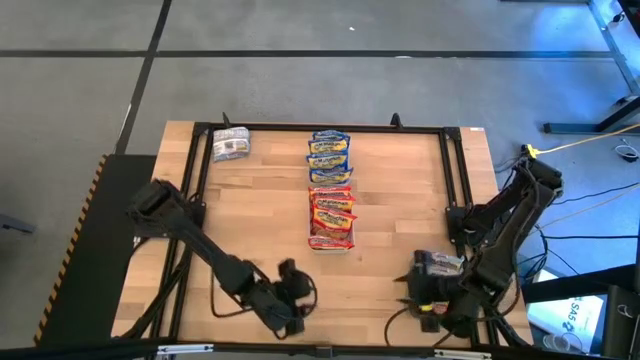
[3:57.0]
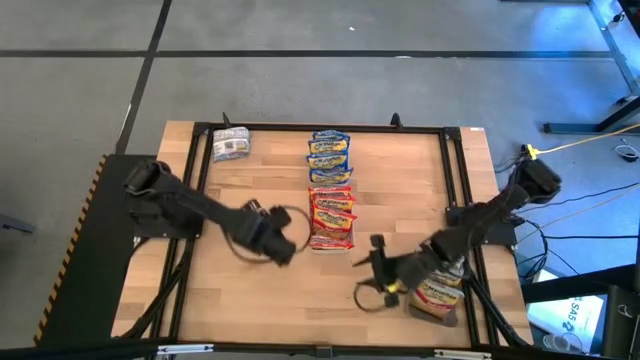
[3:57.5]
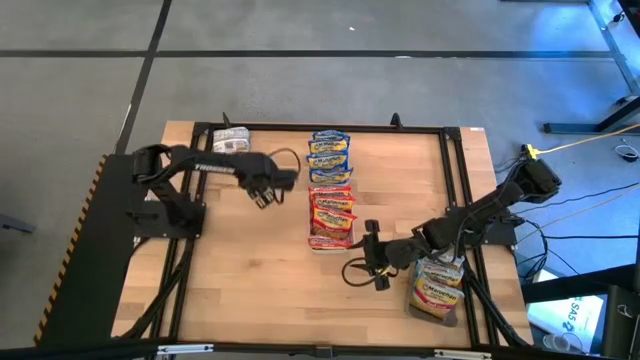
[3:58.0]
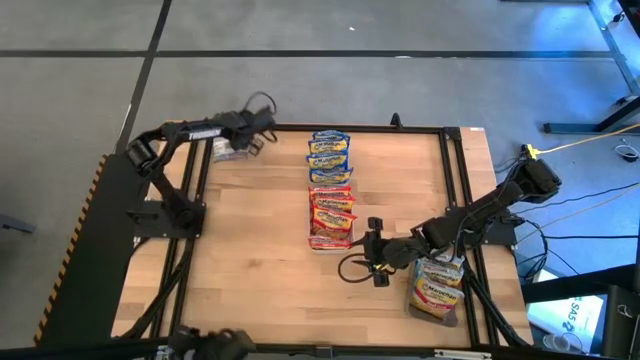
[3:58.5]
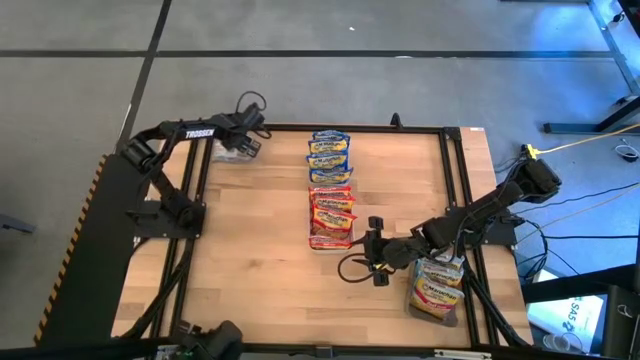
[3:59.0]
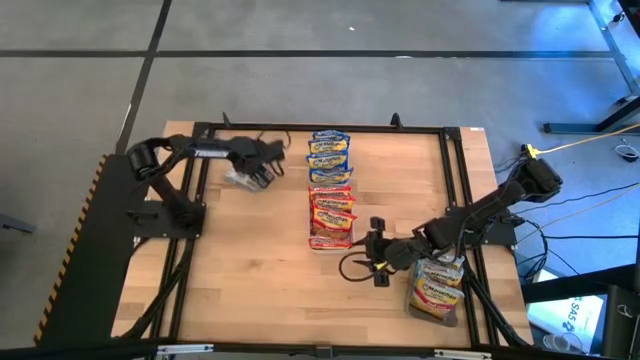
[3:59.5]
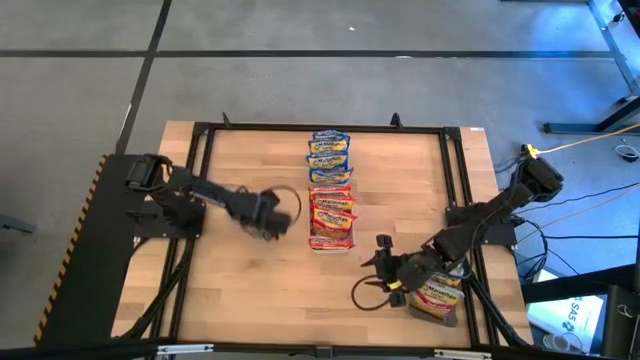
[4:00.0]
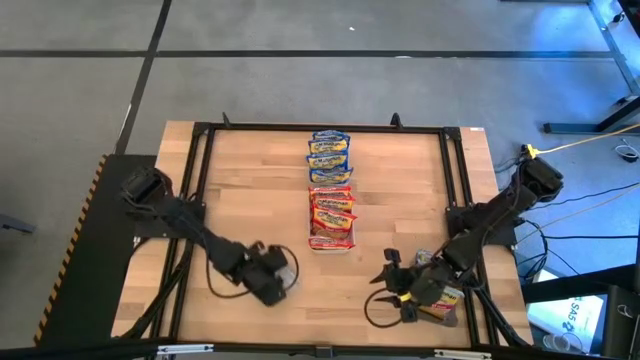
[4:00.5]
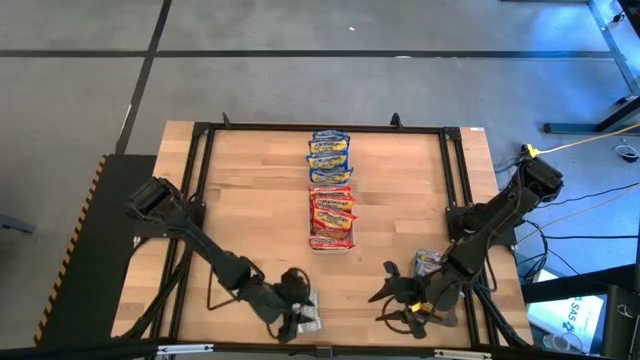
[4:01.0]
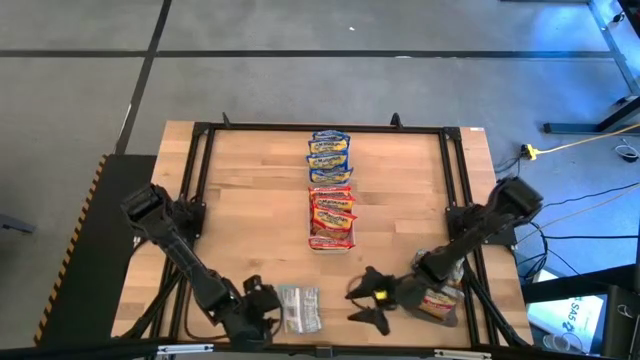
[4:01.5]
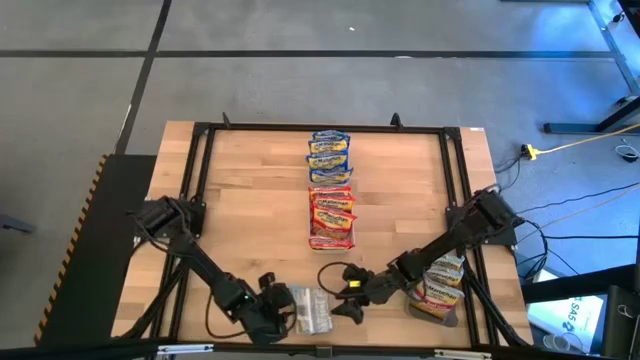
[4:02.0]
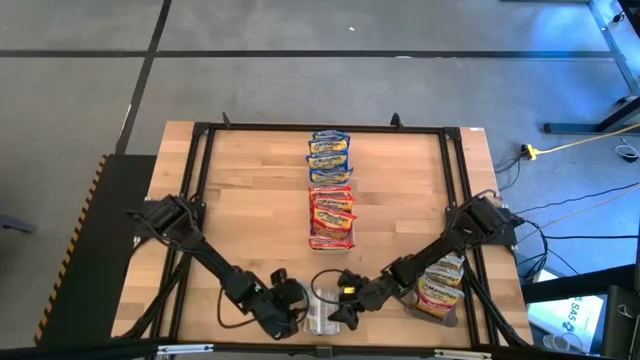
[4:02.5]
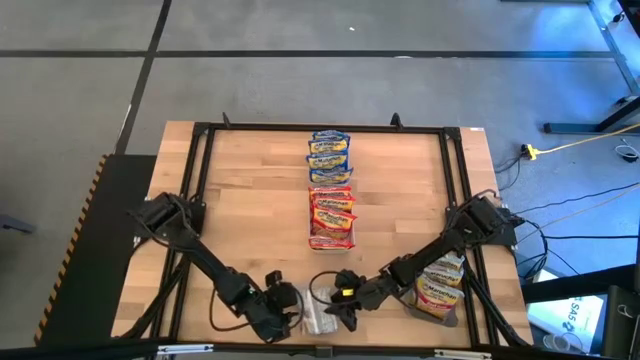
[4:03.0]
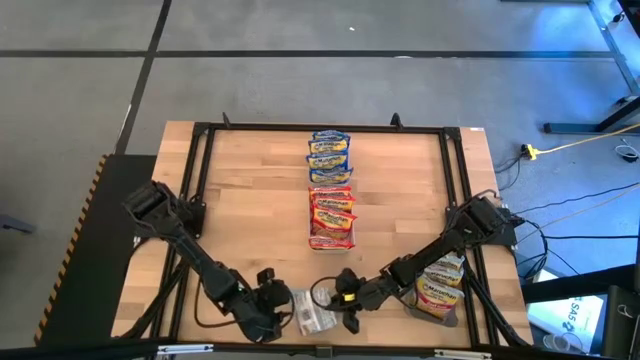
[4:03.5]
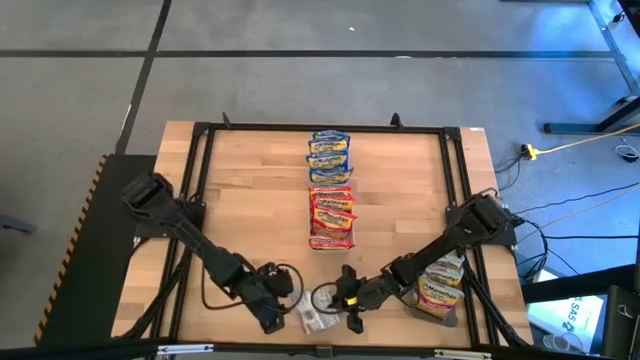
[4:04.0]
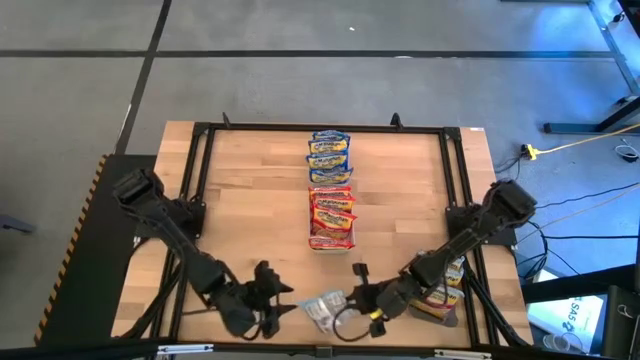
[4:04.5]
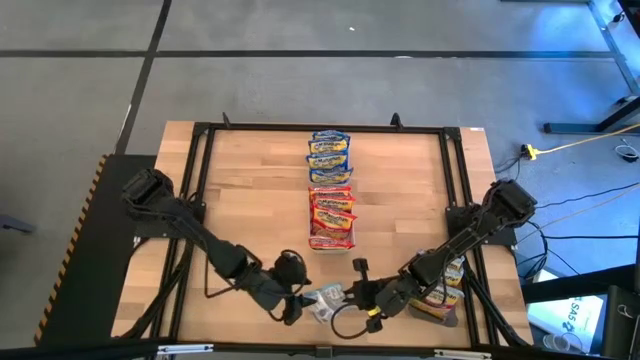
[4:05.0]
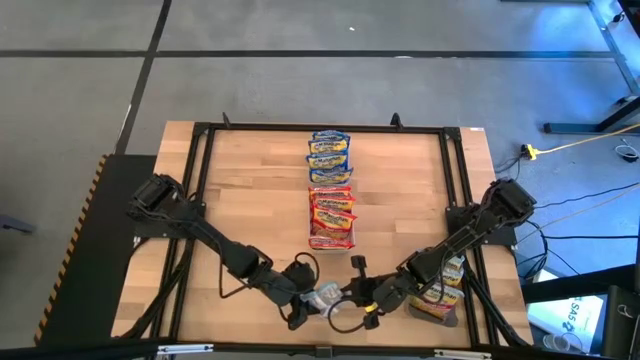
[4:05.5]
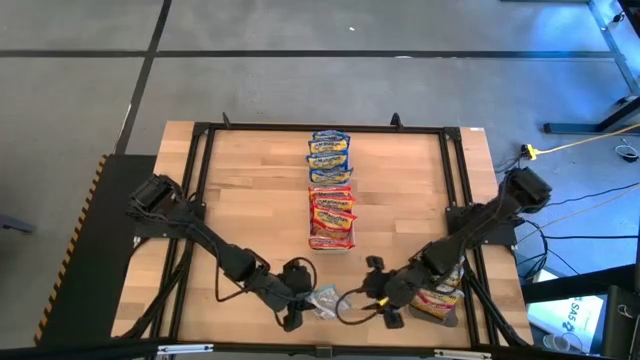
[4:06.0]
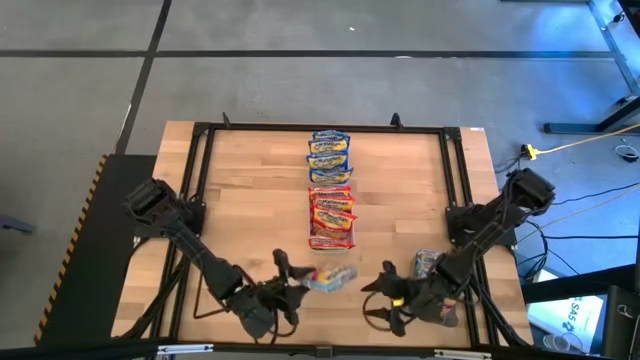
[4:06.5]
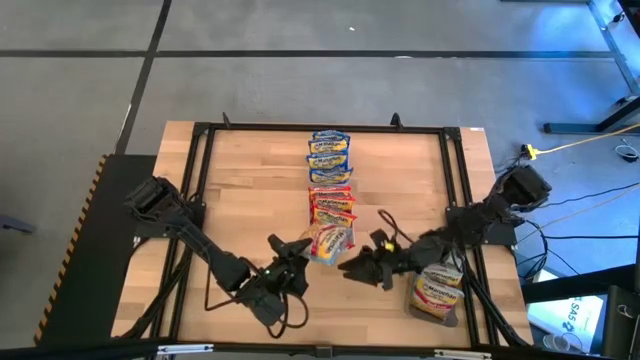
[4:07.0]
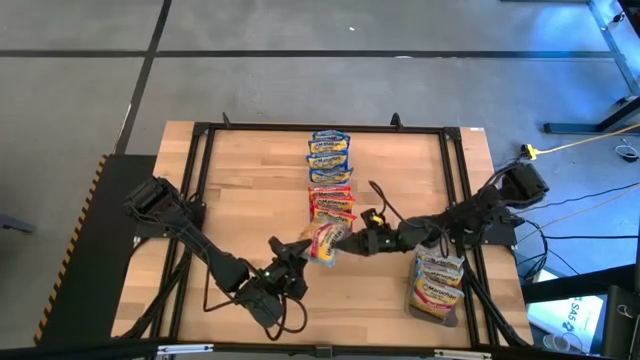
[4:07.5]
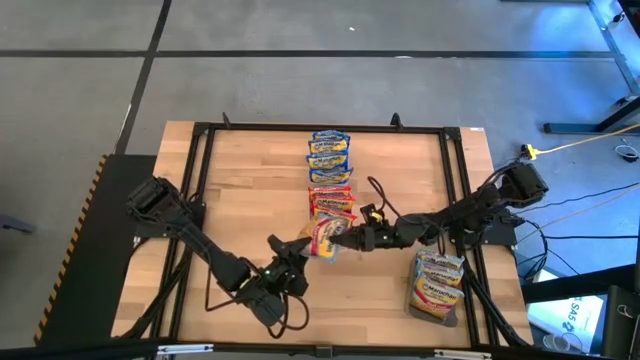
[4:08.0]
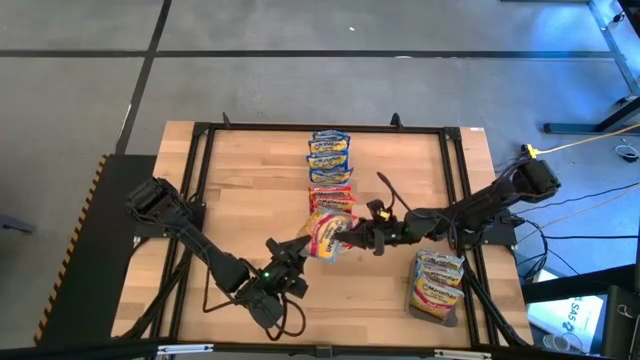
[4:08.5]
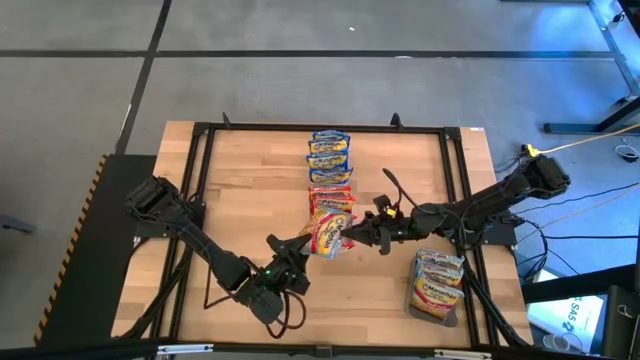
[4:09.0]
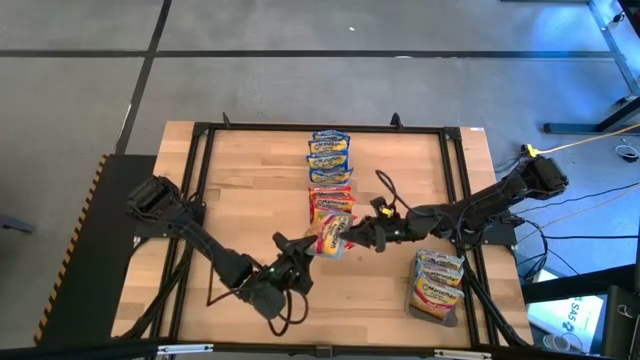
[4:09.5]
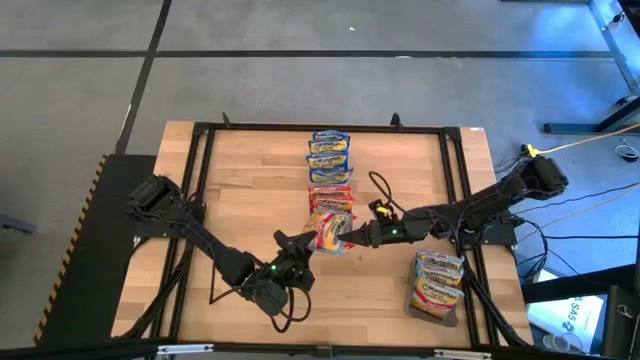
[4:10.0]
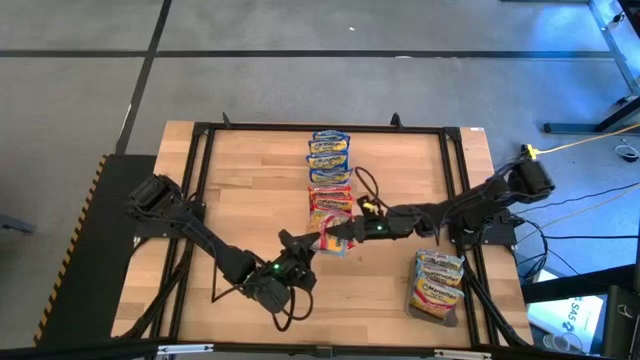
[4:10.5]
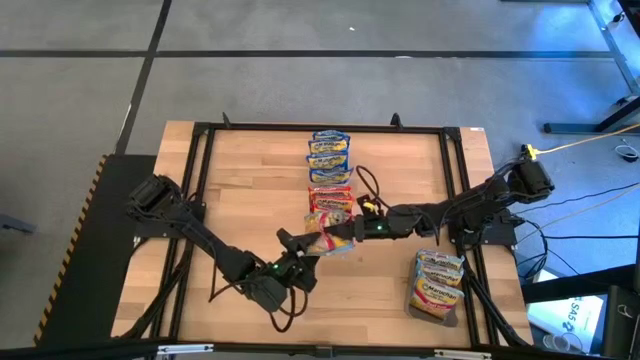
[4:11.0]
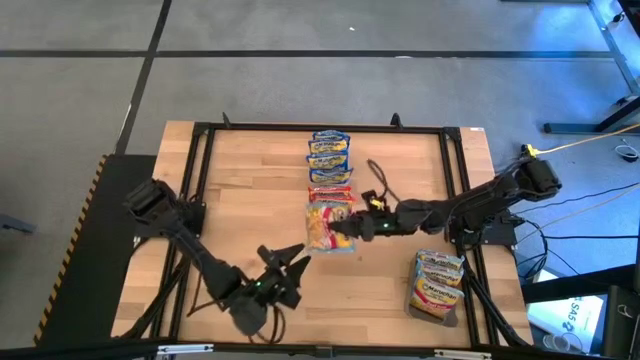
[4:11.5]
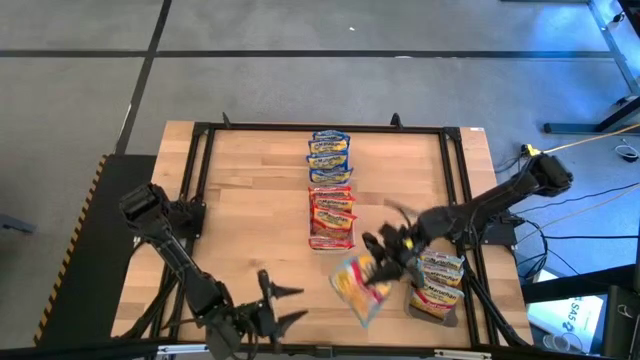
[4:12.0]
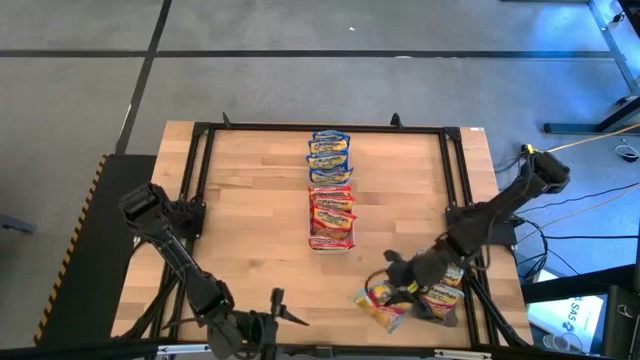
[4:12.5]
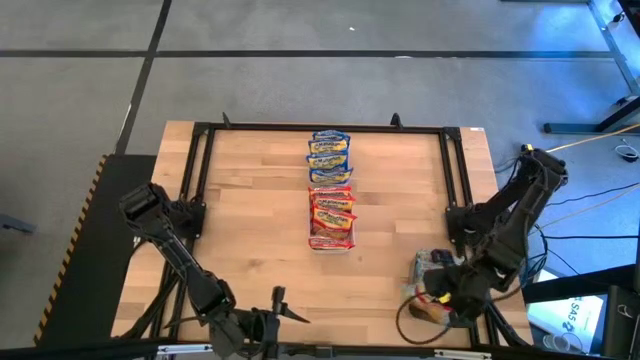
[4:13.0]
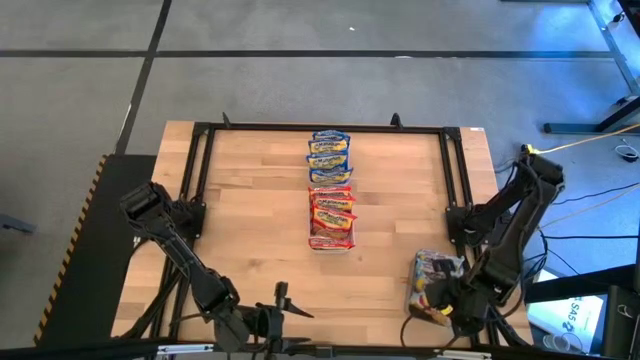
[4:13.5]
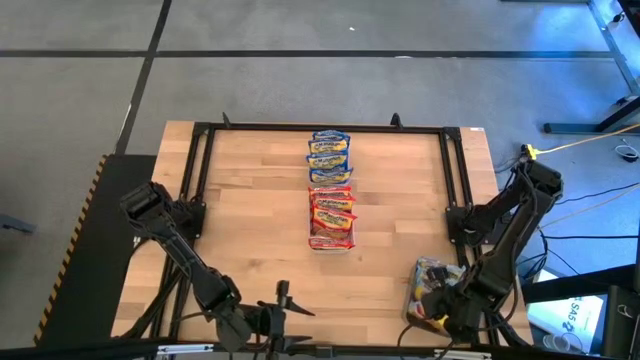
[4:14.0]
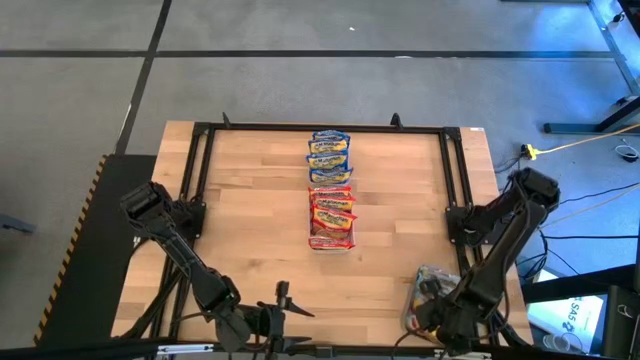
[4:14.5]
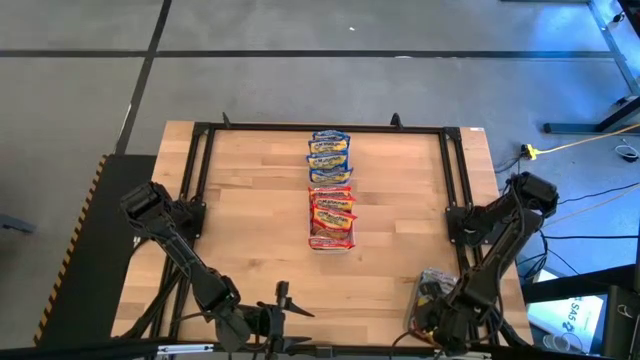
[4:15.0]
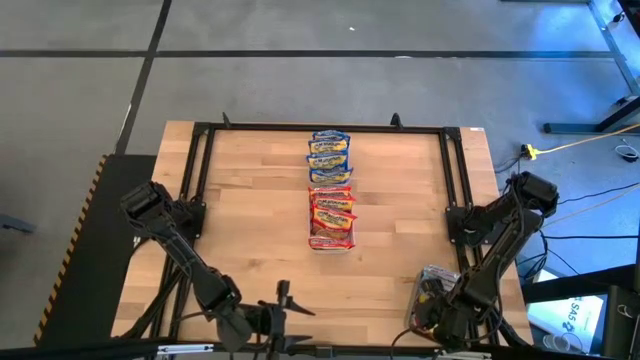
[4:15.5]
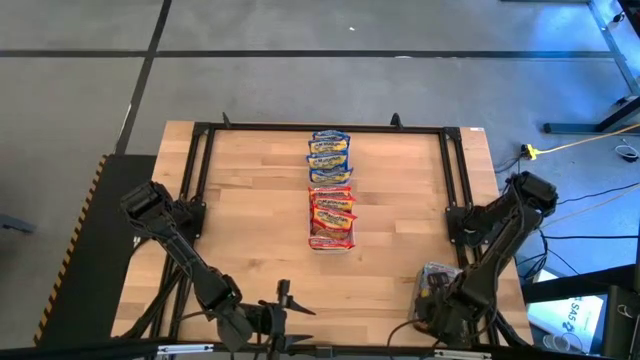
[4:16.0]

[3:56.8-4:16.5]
Task: Sort Maruchan noodles
Put the light blue noodle pack into the black bin

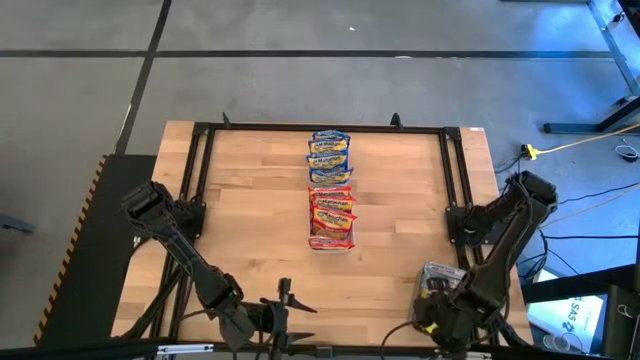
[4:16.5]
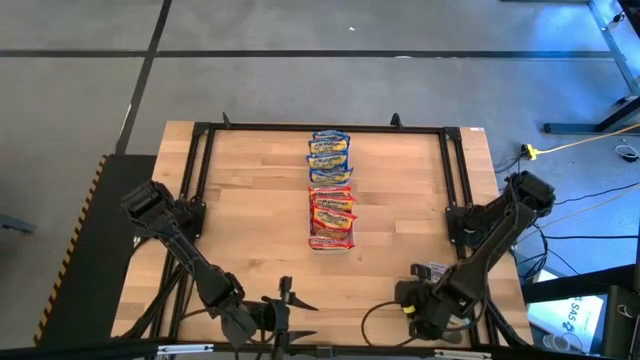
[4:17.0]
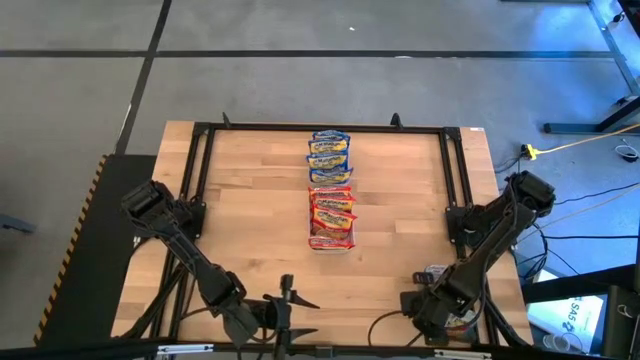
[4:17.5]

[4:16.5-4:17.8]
Adjust the black bin
